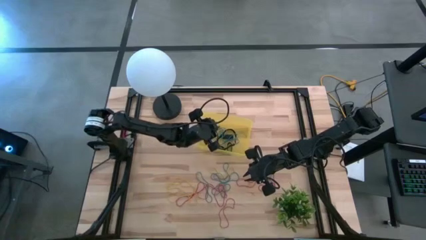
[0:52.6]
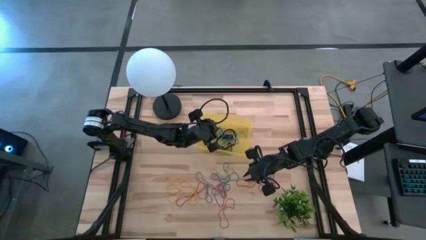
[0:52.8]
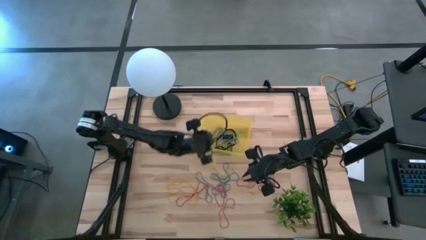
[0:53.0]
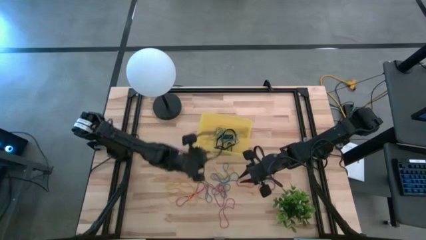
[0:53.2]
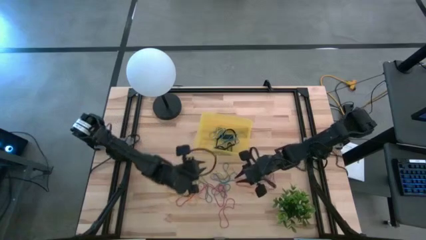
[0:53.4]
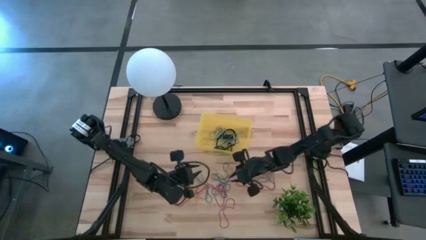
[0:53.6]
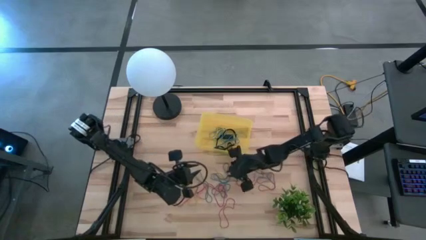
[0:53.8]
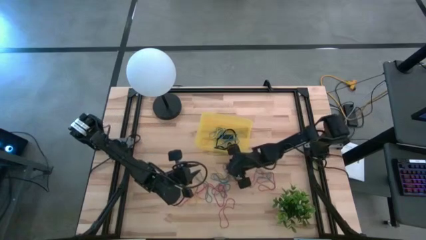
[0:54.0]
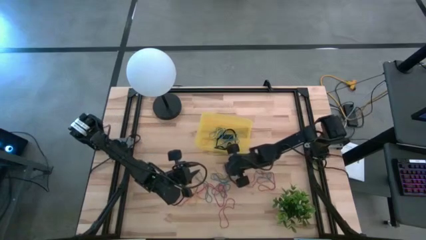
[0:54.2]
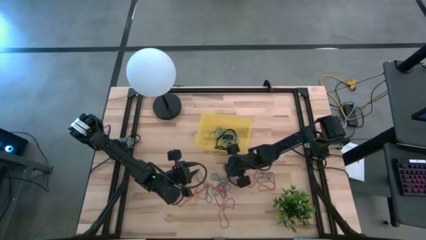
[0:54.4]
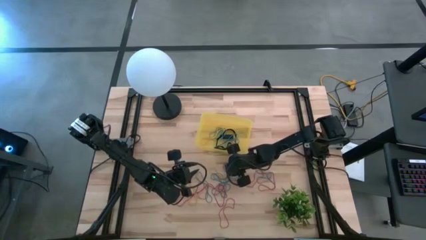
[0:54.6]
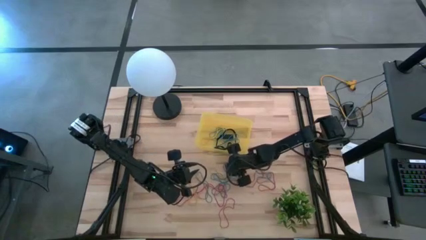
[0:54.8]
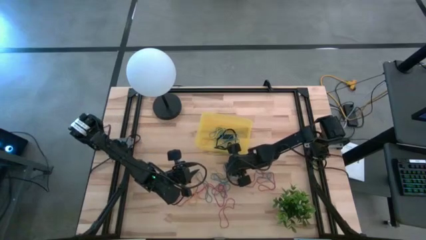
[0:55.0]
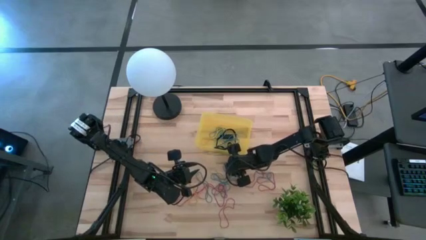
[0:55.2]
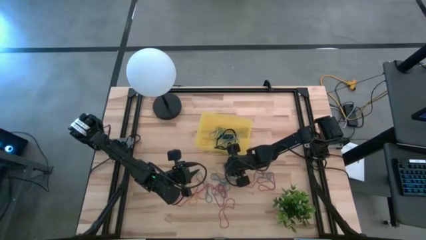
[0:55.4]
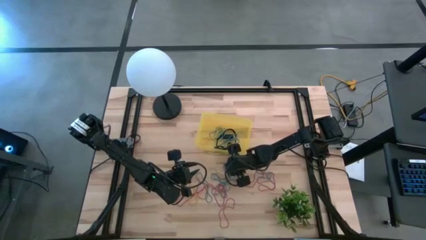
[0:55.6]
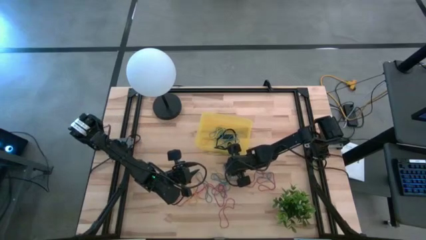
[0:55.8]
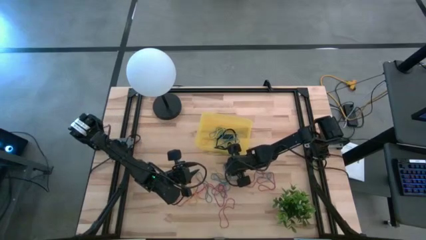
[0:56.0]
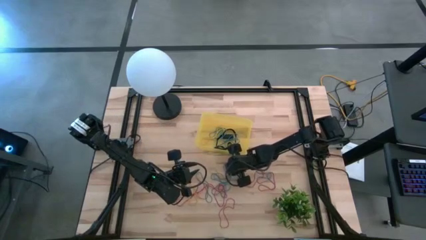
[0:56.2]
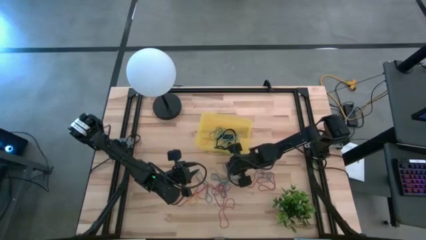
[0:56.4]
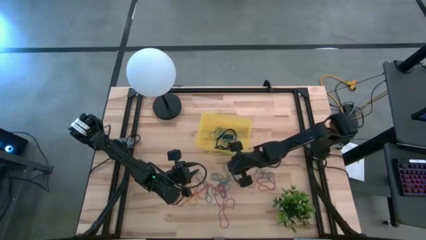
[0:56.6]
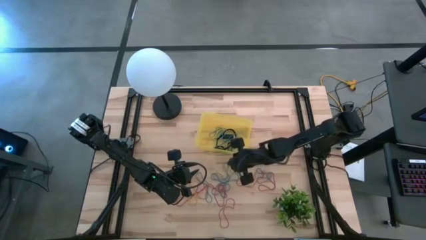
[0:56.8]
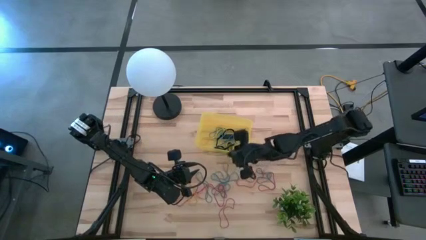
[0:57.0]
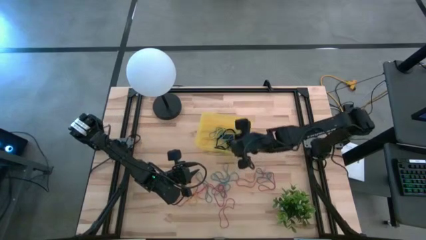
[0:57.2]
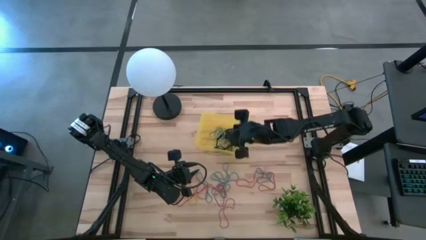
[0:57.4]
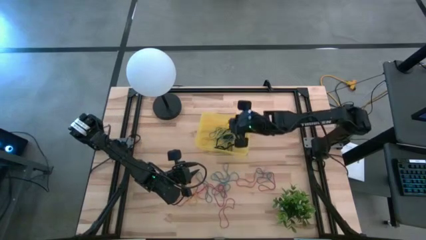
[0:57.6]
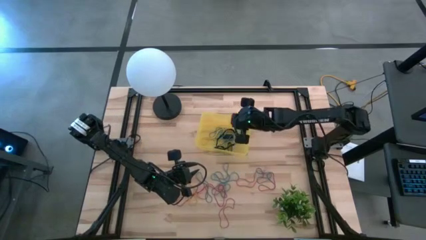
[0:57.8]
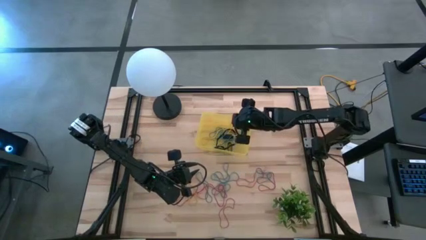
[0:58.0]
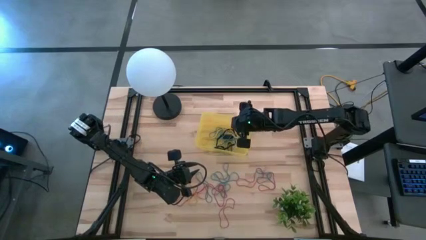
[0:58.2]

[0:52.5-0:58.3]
Task: Pick and place rubber bands into bin
Put the yellow rubber band into the yellow bin

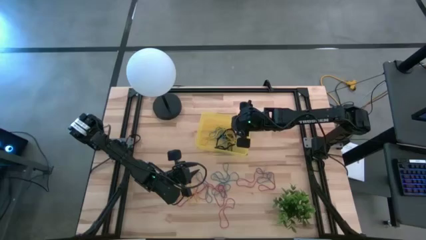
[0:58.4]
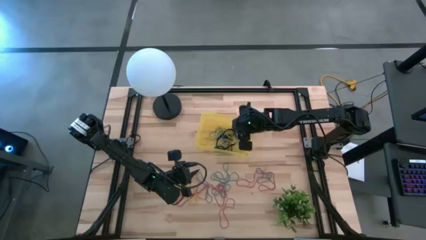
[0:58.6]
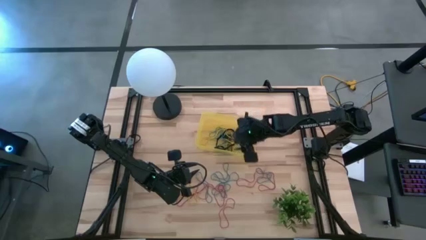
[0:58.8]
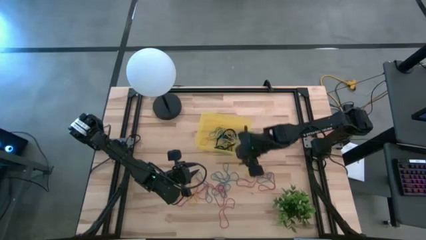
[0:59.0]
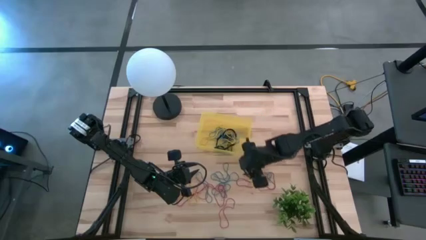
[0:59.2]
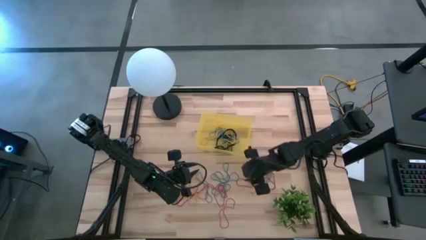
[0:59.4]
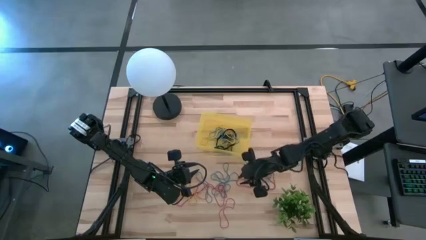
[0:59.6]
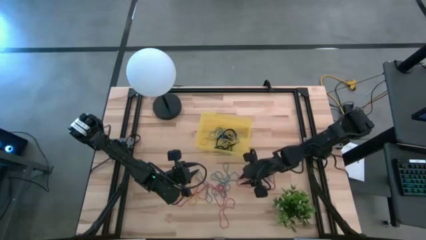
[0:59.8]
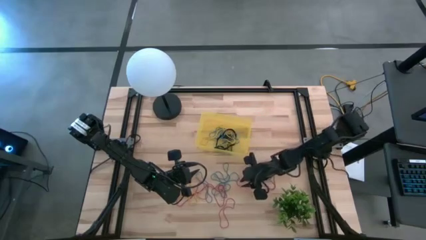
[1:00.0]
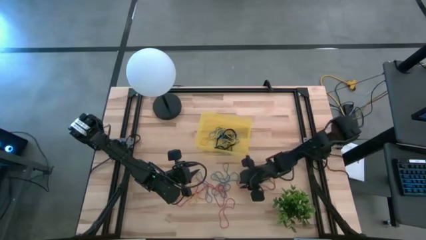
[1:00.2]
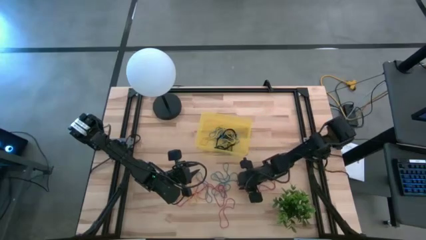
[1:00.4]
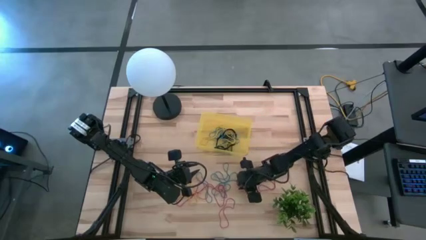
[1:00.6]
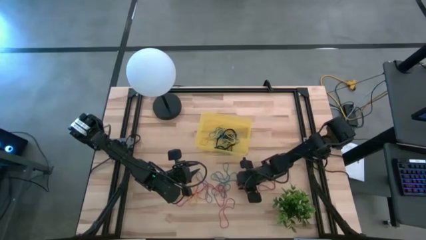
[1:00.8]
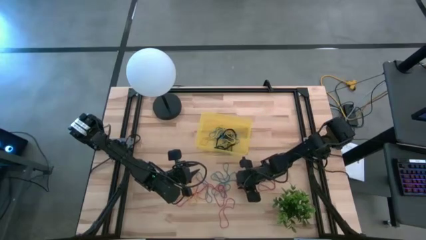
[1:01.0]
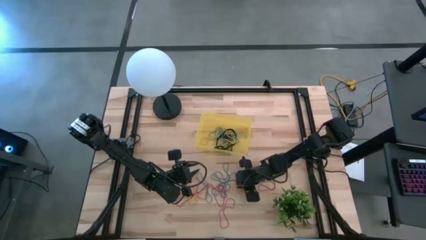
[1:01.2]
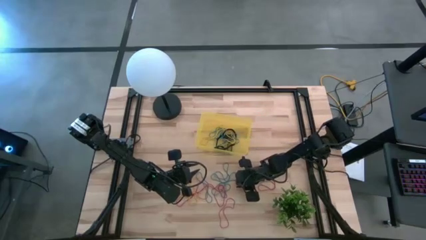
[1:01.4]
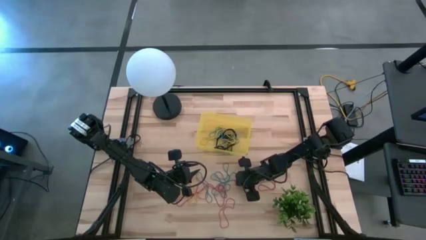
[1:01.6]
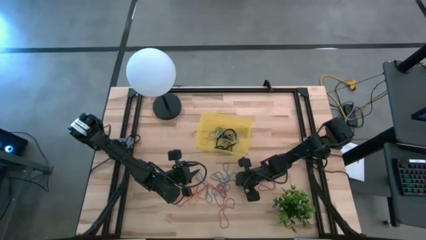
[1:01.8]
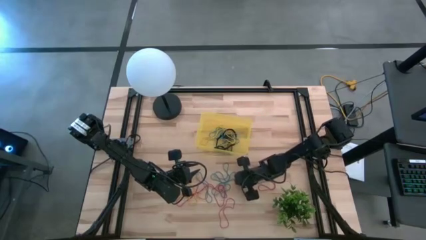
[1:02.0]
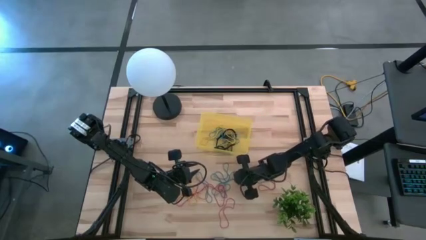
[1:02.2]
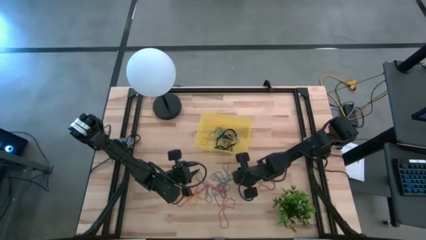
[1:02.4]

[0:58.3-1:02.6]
Put the red rubber band into the yellow bin

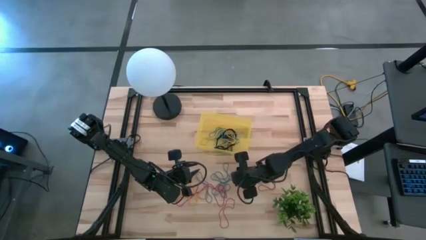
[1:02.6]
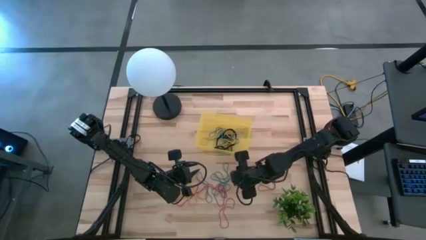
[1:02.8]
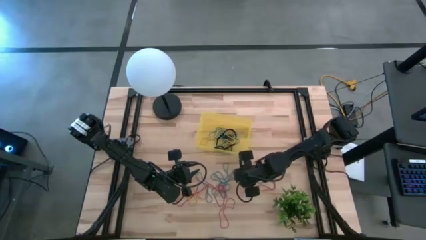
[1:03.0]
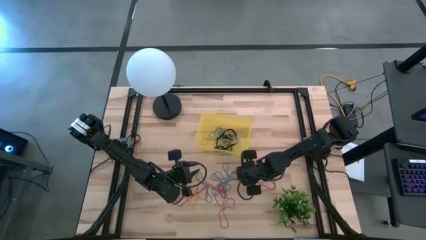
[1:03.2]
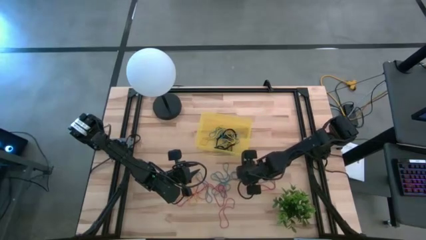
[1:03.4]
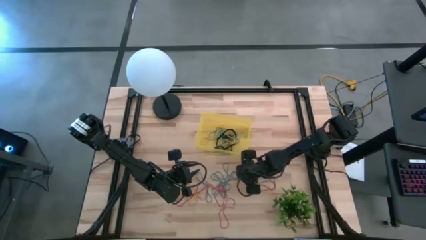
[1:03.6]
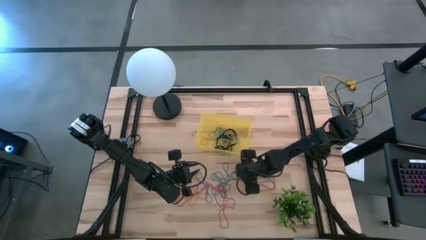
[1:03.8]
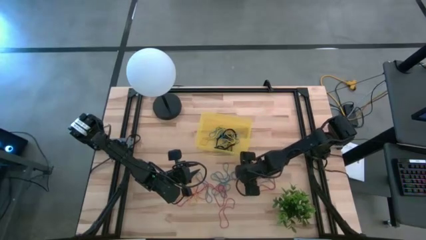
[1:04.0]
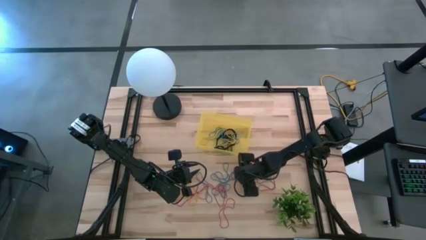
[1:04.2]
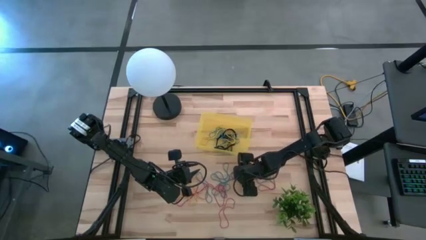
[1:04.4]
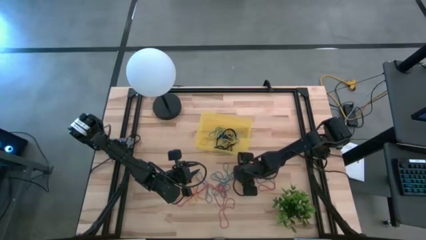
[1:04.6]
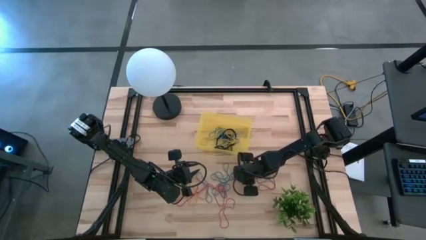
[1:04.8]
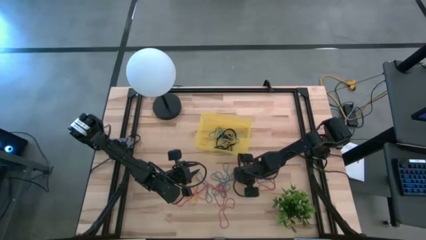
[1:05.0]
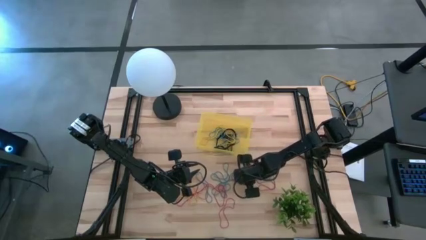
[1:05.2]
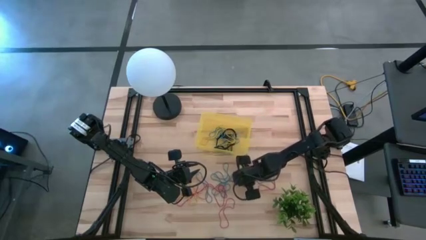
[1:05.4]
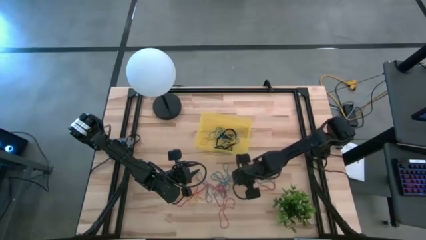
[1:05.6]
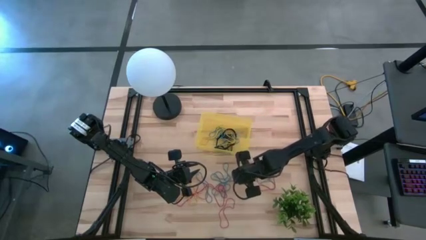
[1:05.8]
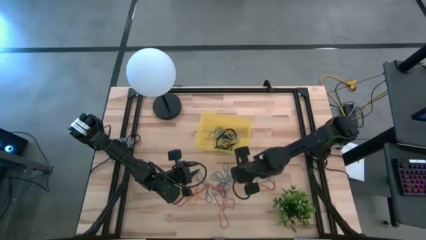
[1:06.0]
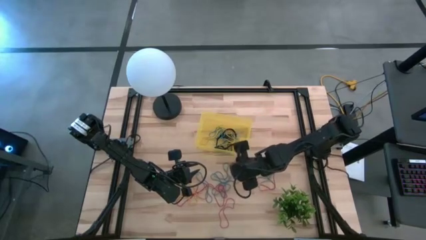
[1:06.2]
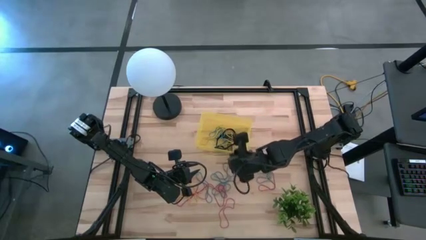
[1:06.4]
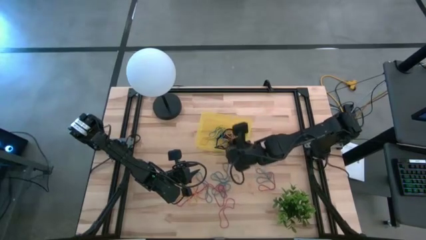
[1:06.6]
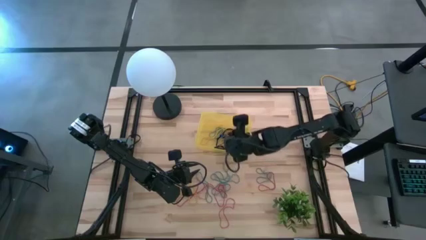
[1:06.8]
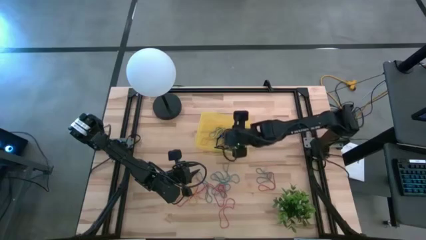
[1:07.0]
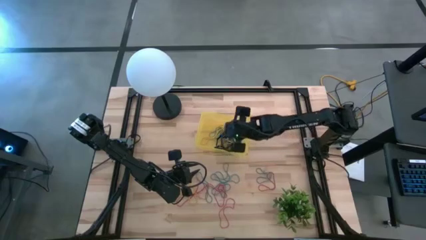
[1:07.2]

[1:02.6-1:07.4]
Put the red rubber band into the yellow bin

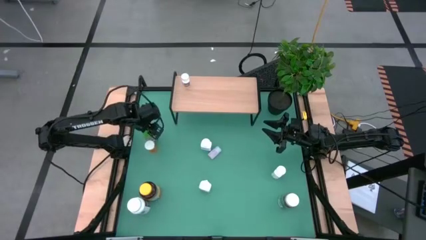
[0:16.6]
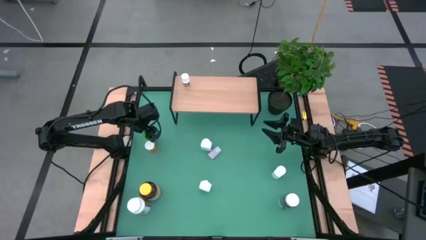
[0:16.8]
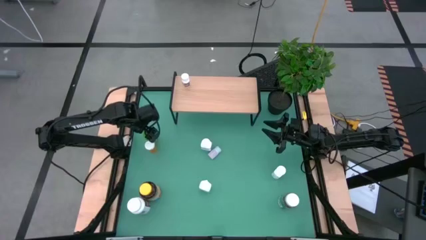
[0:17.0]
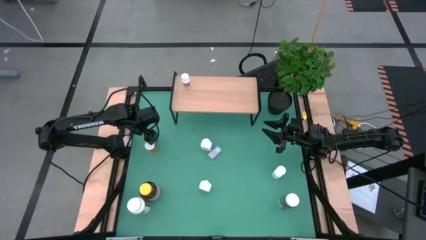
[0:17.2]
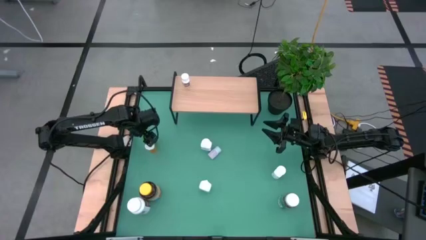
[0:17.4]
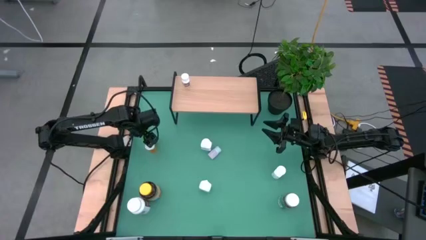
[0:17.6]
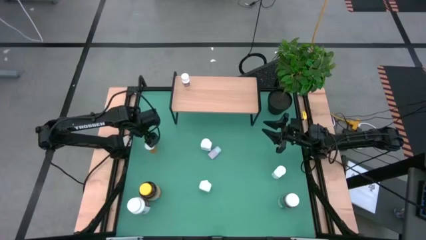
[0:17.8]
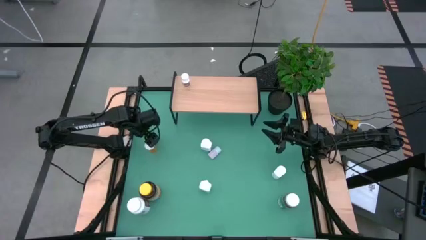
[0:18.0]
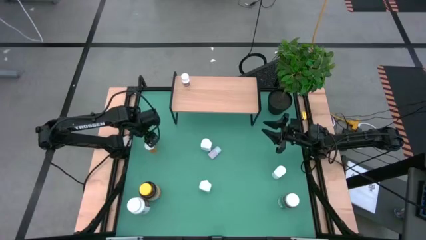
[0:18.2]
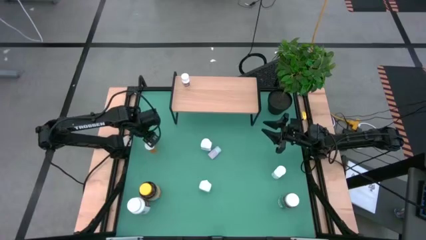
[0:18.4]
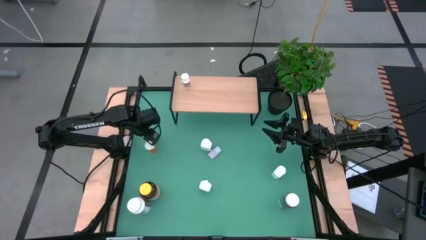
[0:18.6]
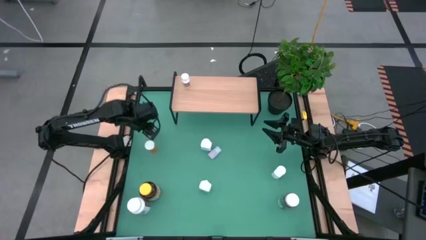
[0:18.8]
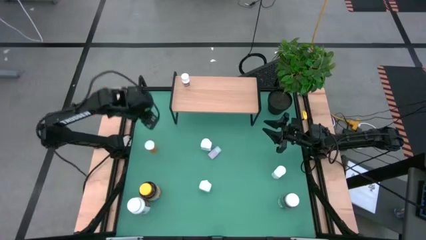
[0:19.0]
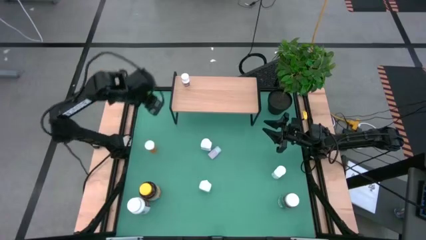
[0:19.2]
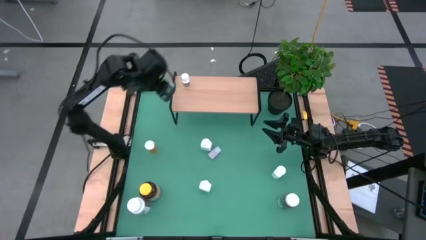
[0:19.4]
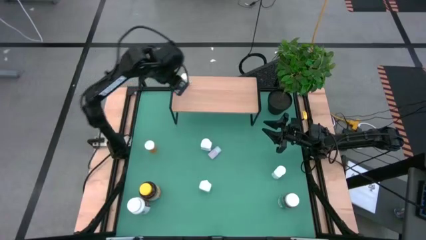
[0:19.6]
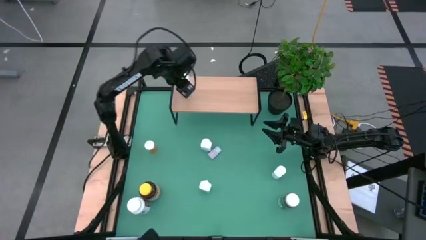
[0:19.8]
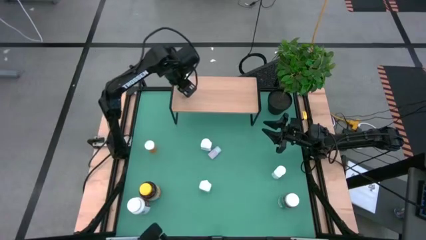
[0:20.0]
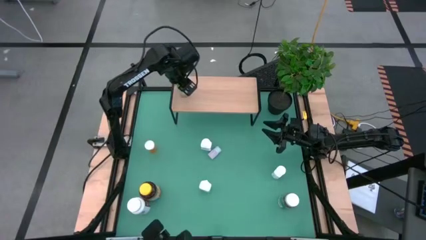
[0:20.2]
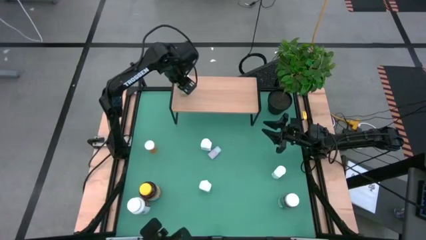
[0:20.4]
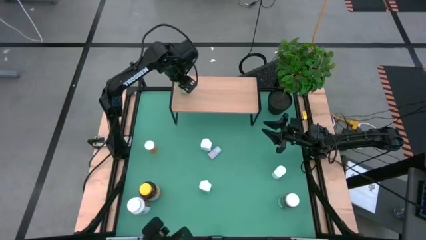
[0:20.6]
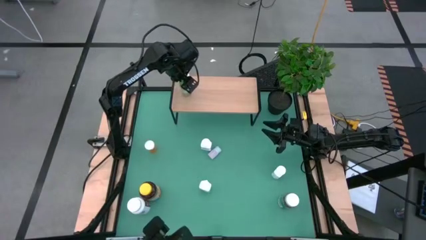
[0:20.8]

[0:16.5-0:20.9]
Task: Pick and place medicine bottles onto shelf by color
Put the green bottle on the shelf
